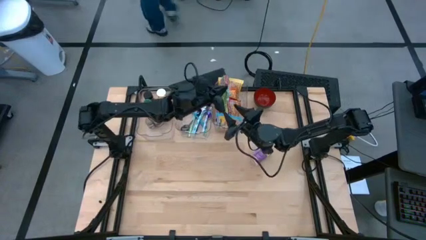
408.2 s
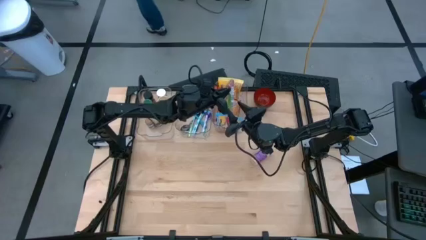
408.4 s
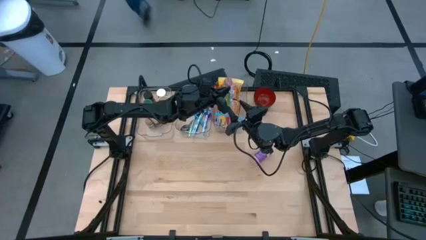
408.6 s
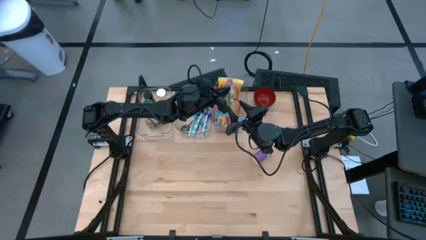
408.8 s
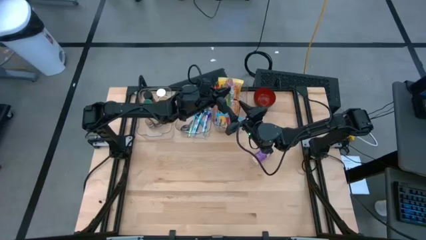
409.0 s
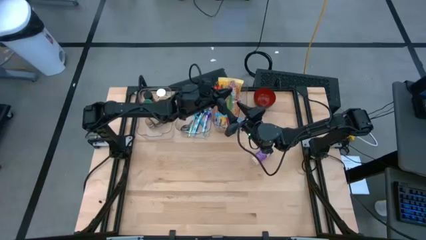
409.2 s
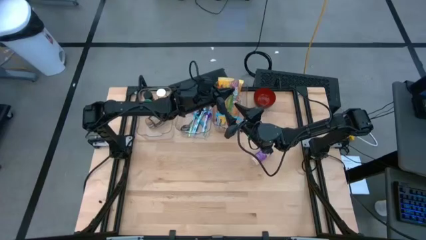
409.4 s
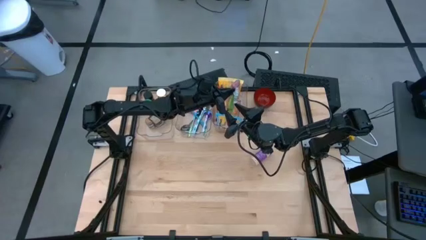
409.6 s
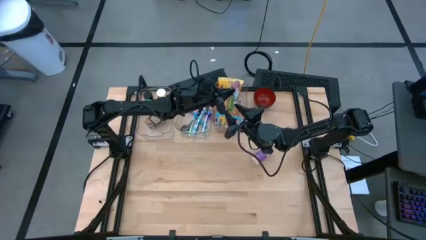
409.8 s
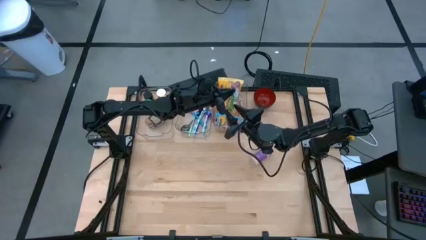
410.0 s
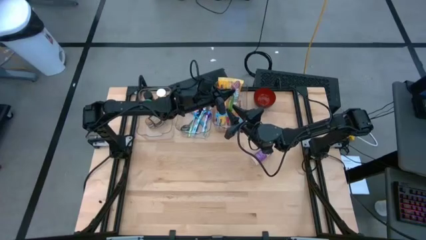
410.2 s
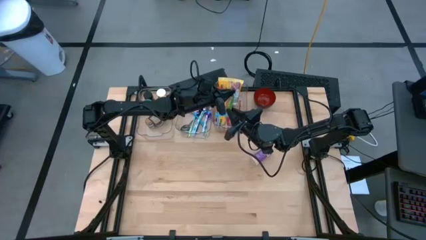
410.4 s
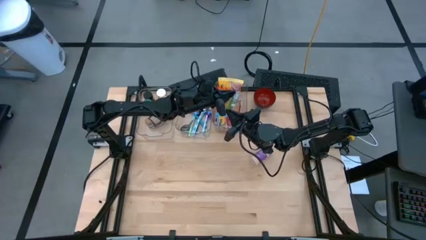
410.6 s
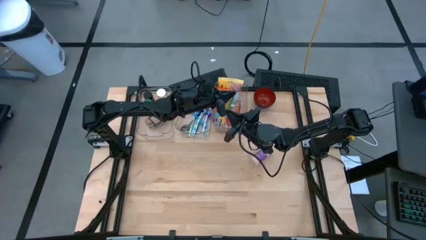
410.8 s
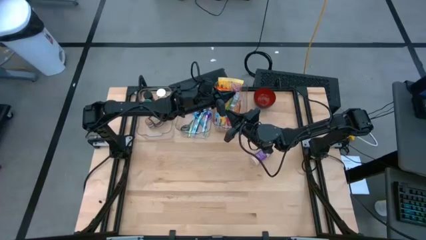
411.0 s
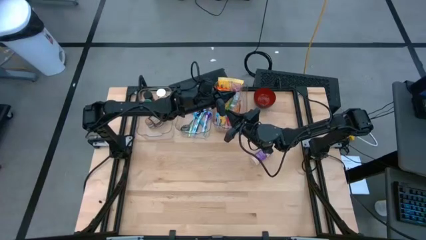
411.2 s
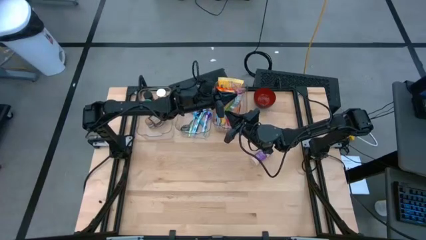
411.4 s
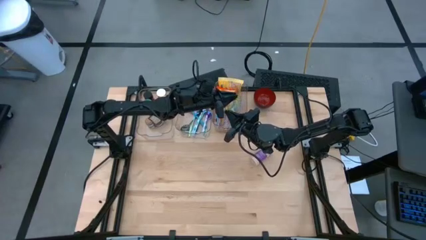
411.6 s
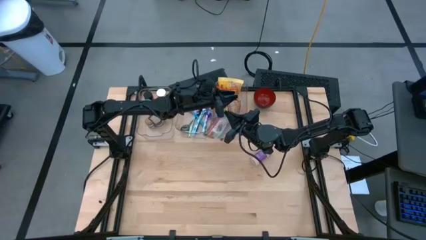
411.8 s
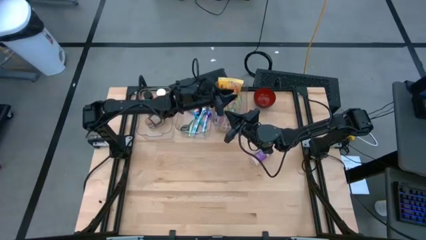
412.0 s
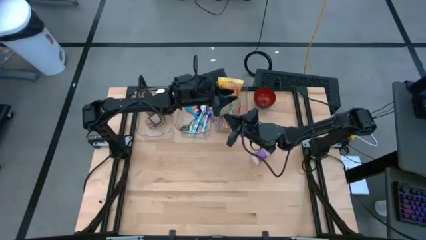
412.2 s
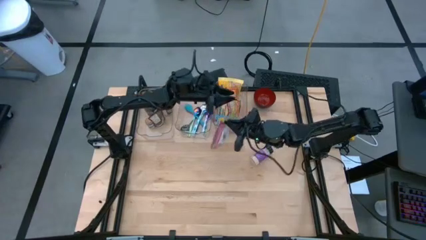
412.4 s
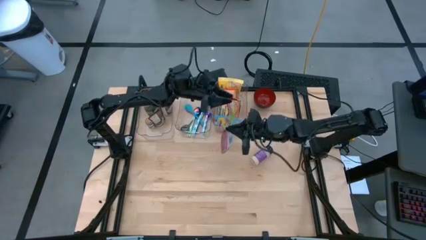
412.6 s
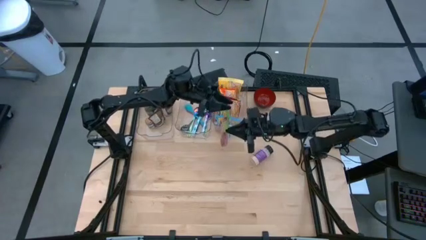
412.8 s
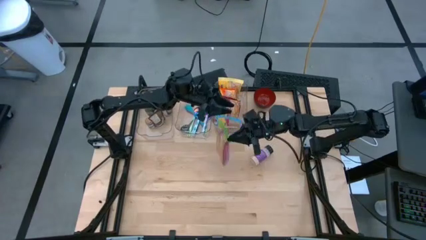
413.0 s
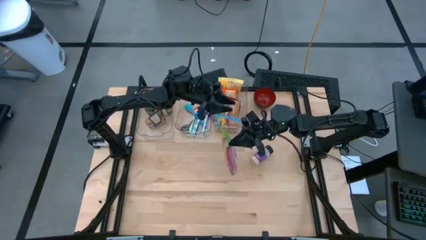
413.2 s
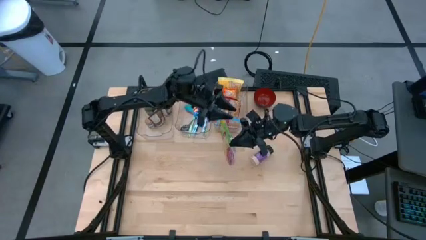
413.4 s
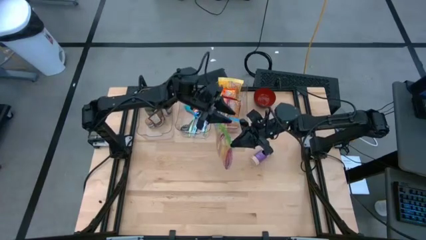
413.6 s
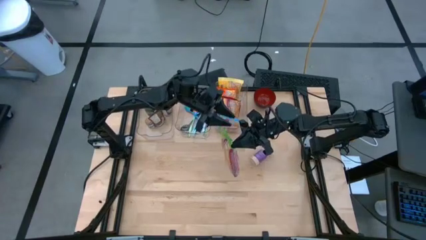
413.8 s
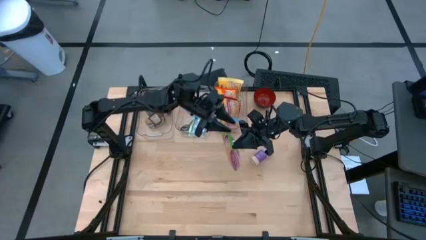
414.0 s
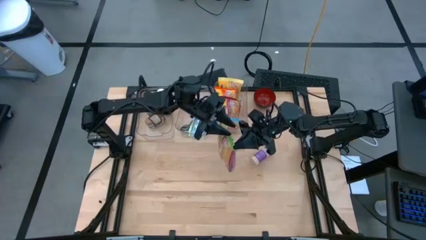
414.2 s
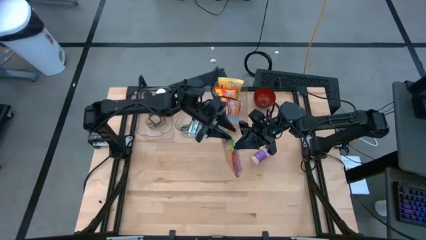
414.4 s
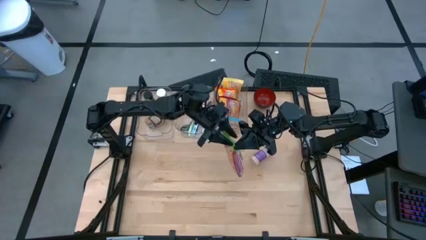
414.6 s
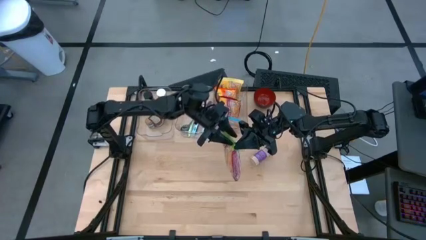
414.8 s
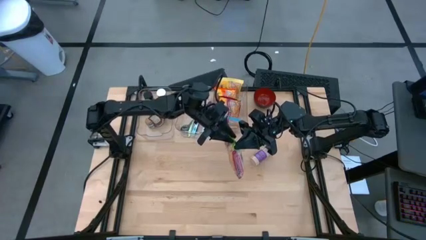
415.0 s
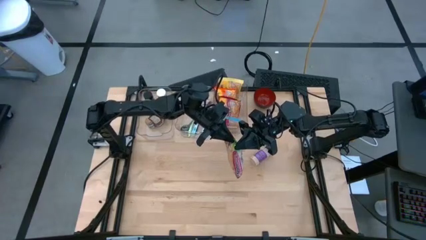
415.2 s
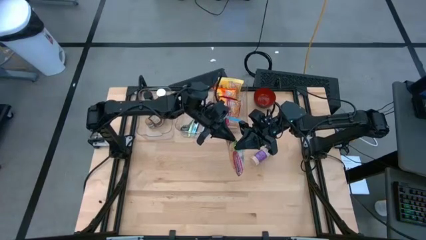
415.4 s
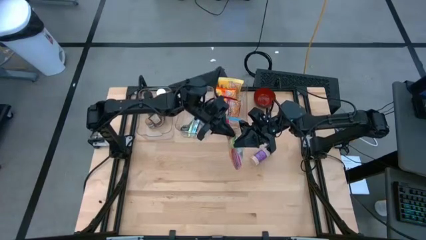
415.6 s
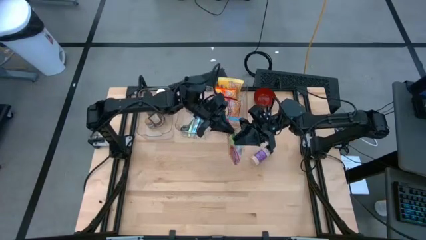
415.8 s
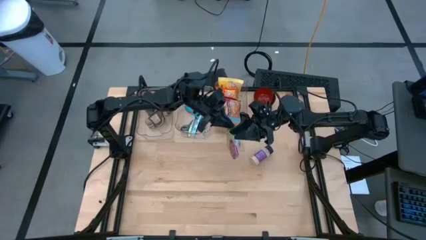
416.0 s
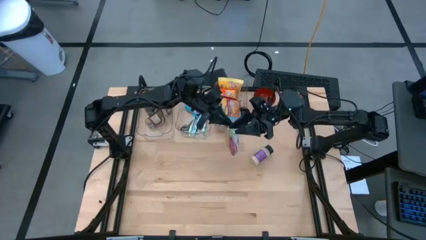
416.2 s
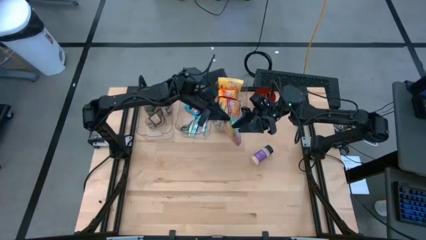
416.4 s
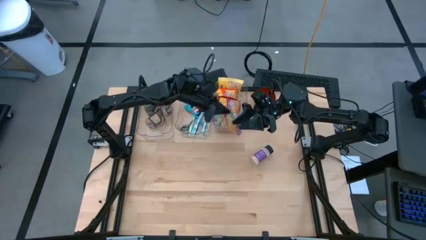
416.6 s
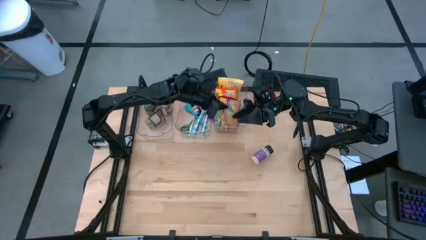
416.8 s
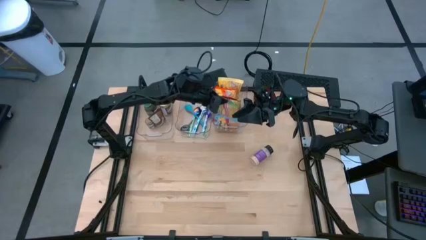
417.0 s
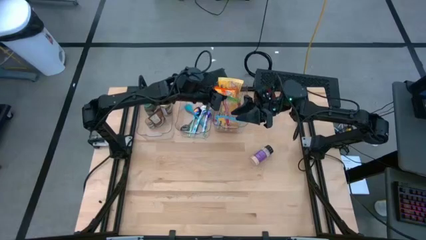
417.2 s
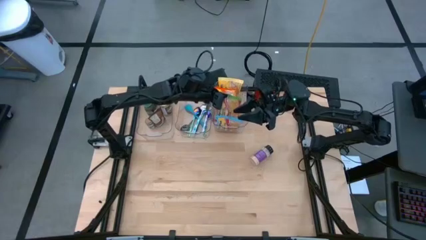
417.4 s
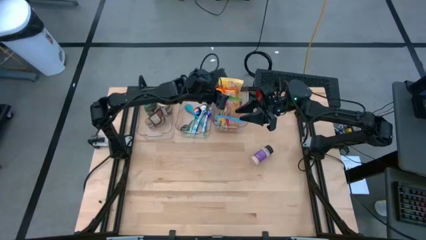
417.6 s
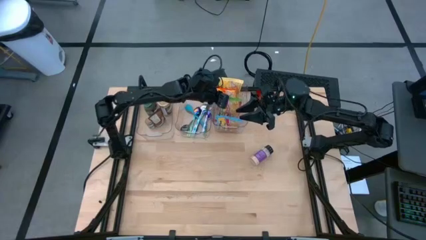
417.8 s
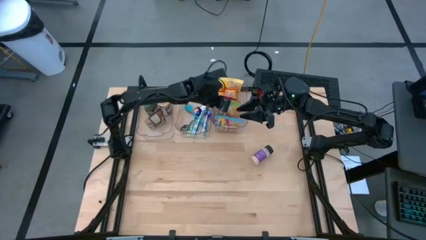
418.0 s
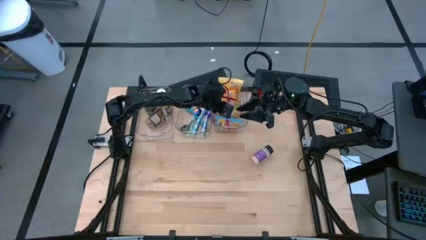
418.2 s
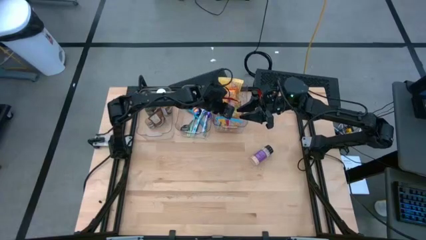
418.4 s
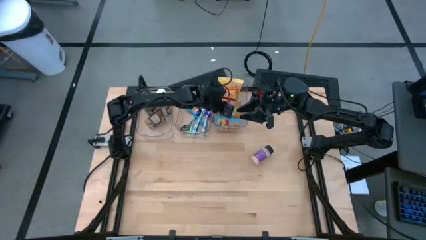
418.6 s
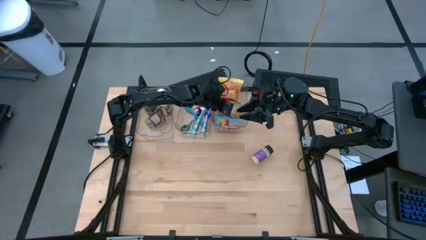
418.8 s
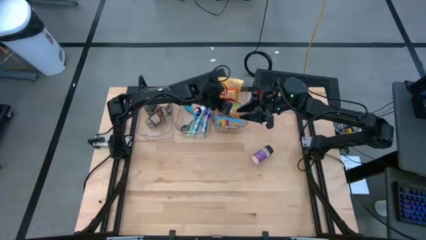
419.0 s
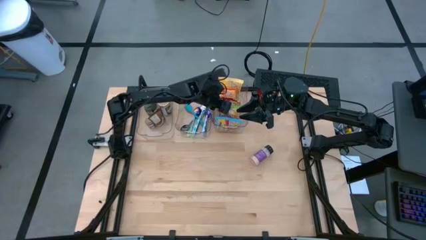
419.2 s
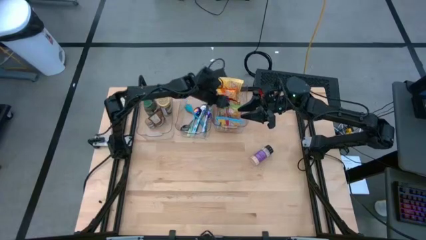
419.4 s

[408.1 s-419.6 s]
Task: Pick & Place Food Item
Put the green noodle pack into the right transparent bin
